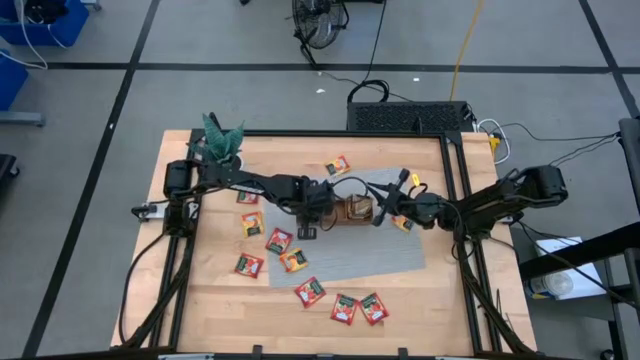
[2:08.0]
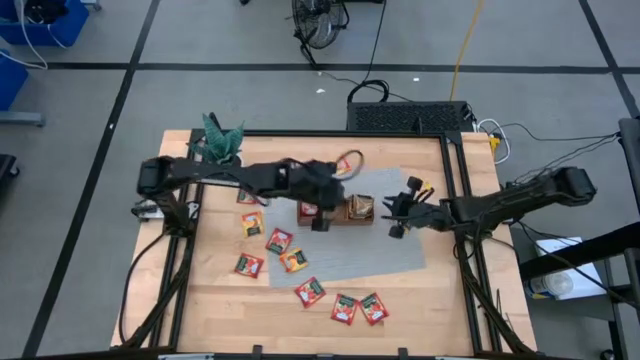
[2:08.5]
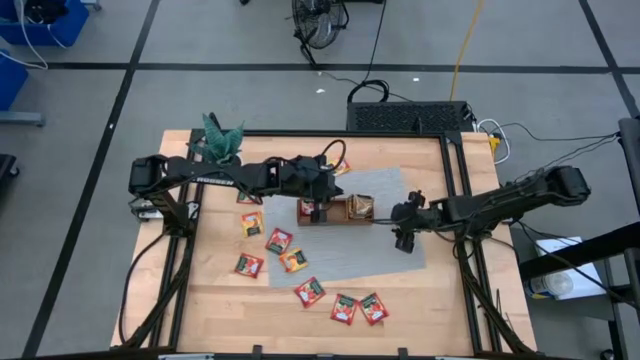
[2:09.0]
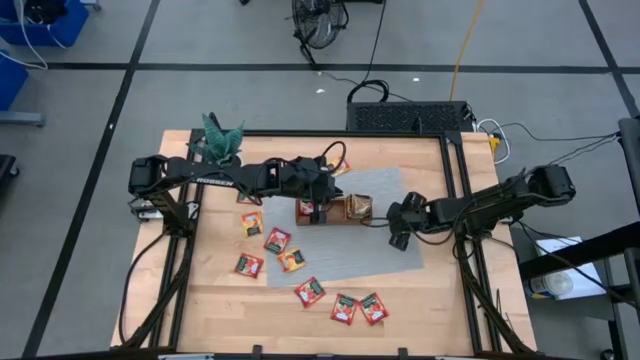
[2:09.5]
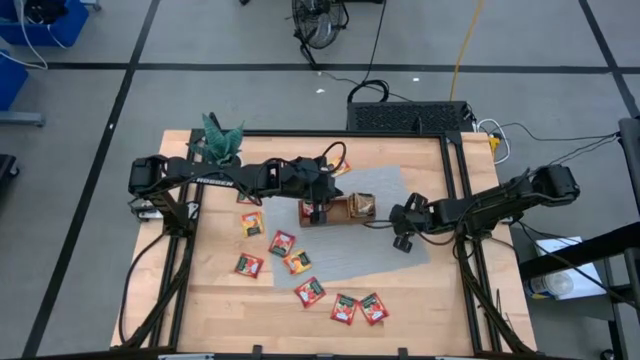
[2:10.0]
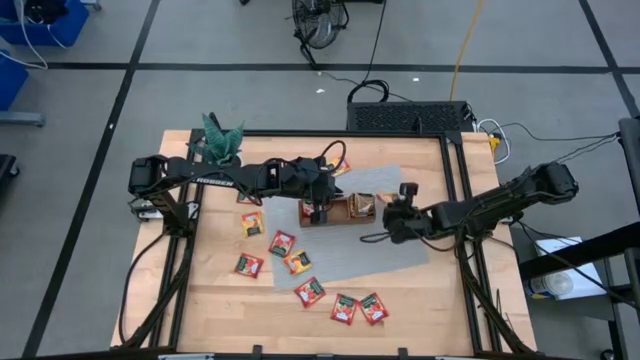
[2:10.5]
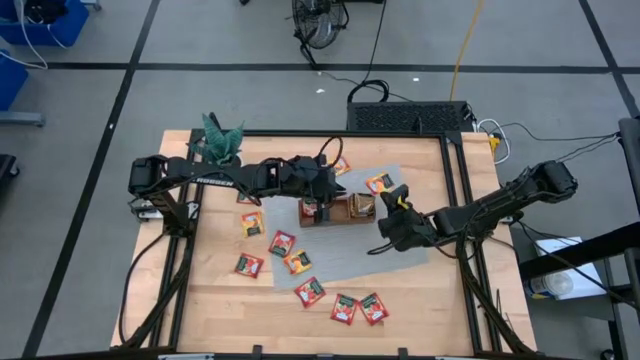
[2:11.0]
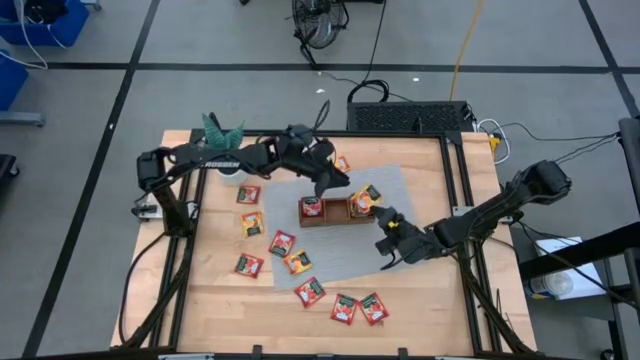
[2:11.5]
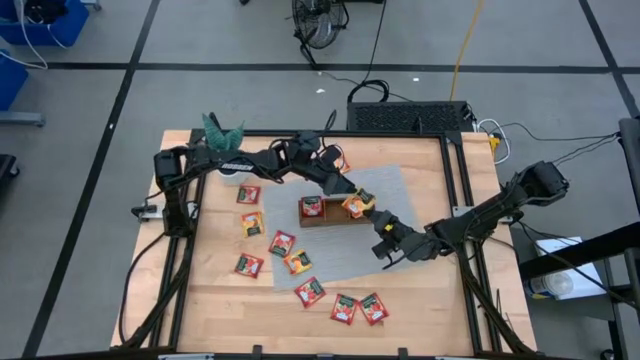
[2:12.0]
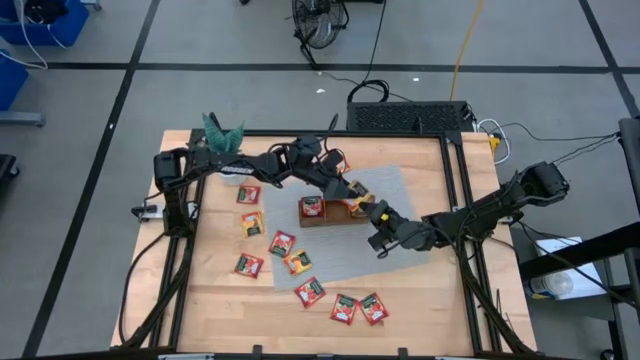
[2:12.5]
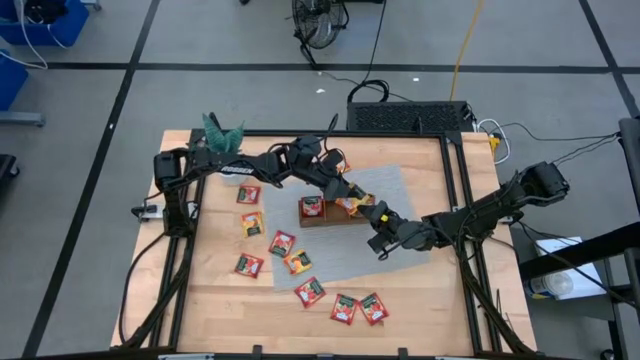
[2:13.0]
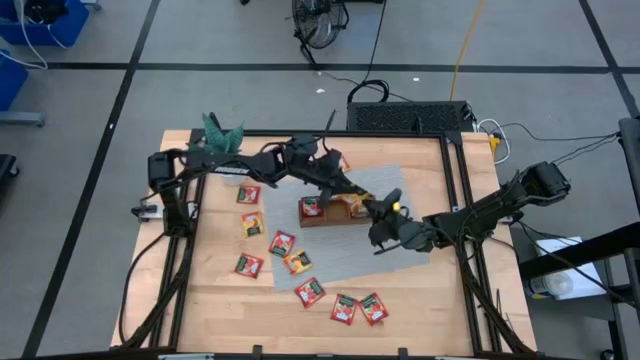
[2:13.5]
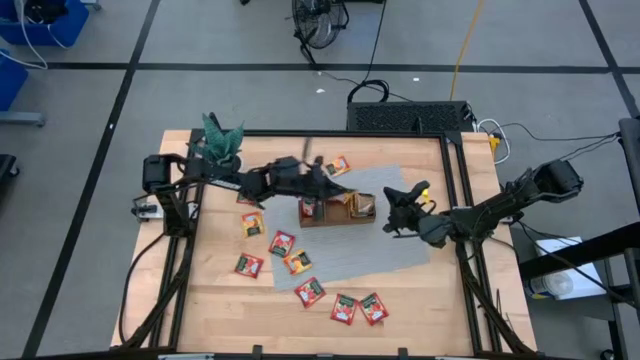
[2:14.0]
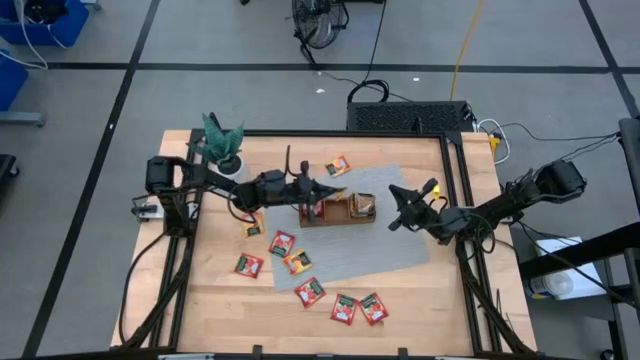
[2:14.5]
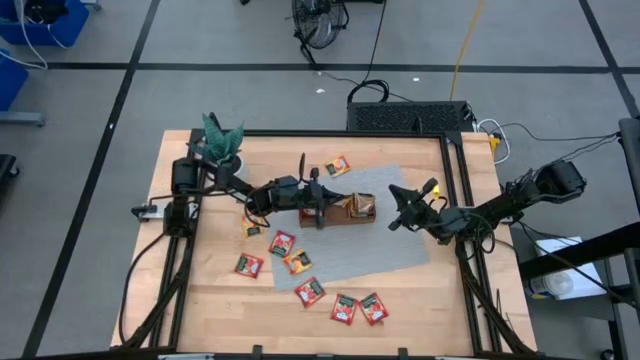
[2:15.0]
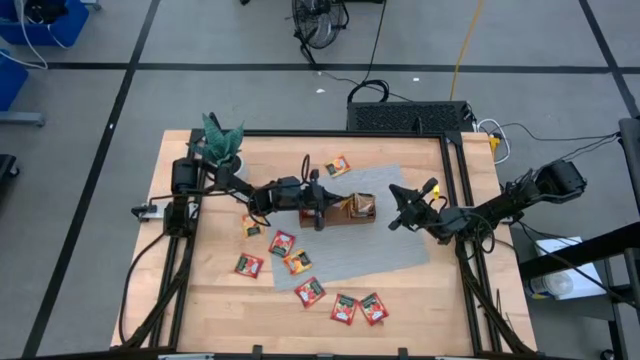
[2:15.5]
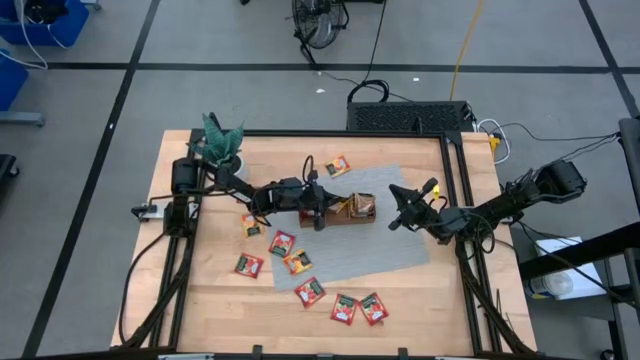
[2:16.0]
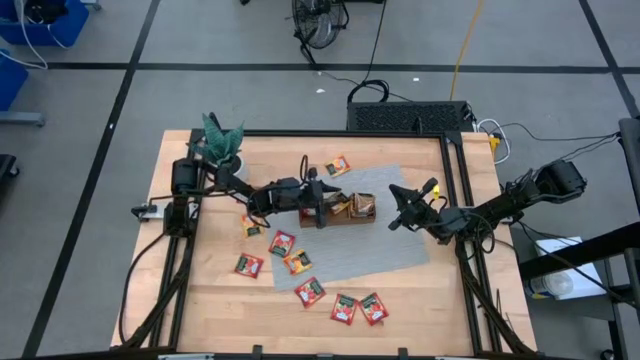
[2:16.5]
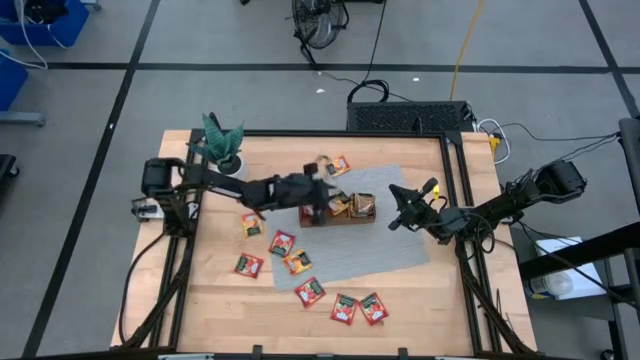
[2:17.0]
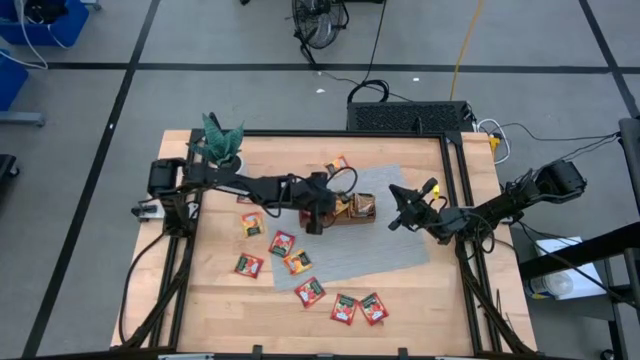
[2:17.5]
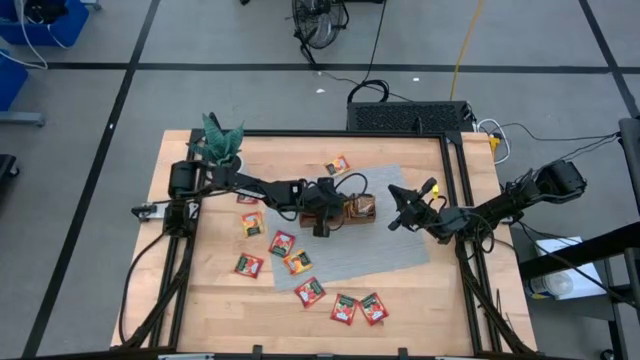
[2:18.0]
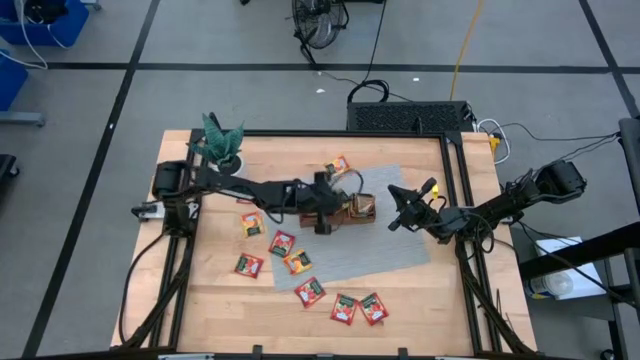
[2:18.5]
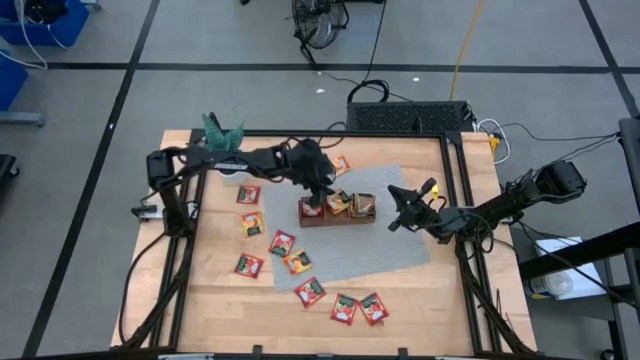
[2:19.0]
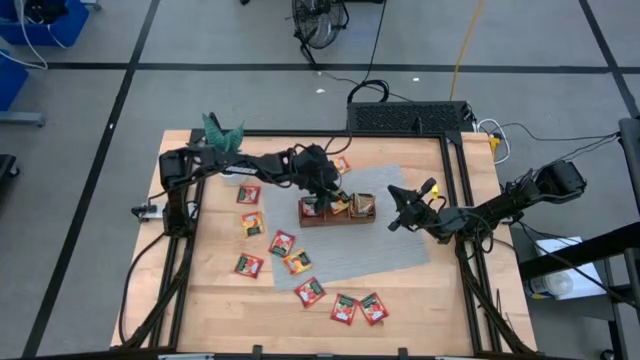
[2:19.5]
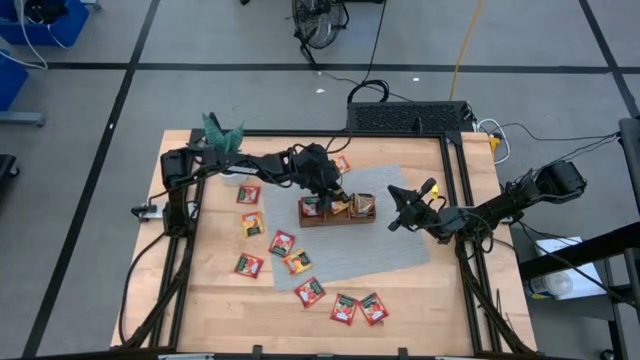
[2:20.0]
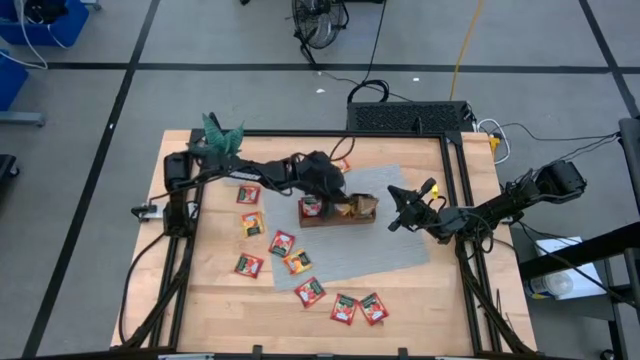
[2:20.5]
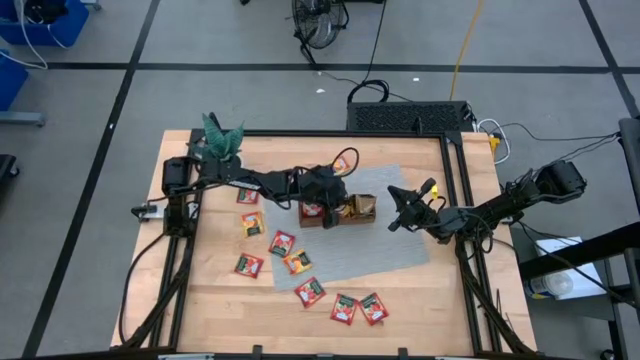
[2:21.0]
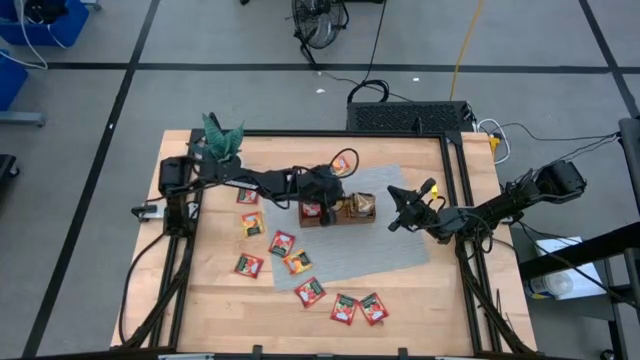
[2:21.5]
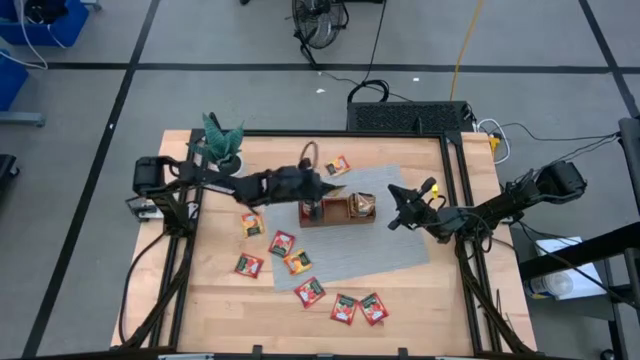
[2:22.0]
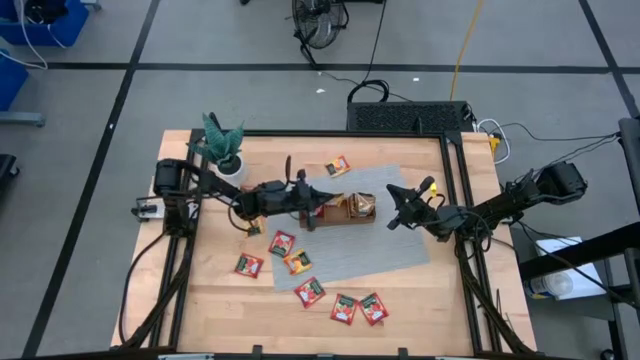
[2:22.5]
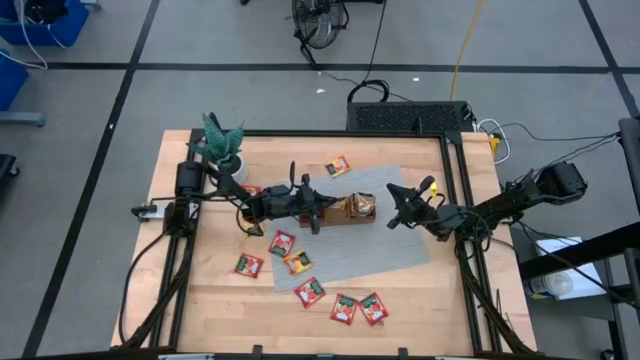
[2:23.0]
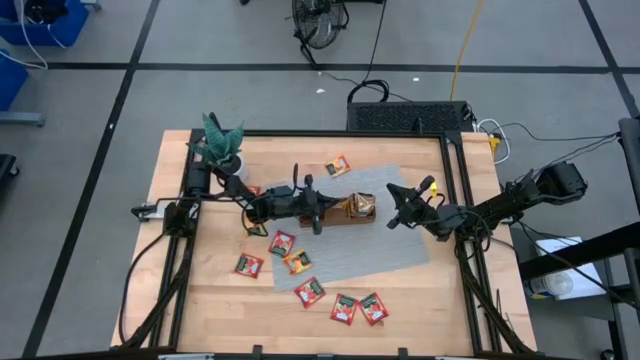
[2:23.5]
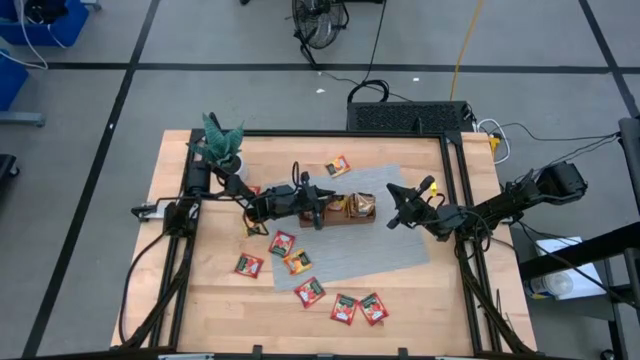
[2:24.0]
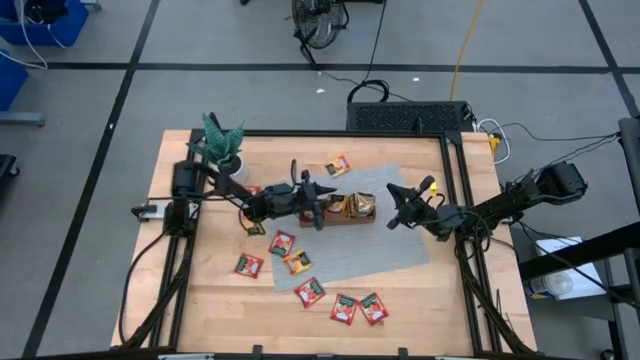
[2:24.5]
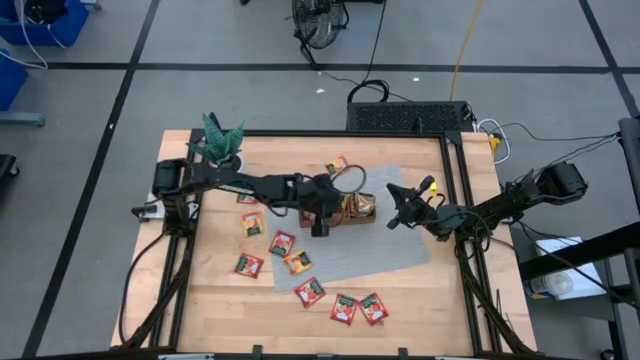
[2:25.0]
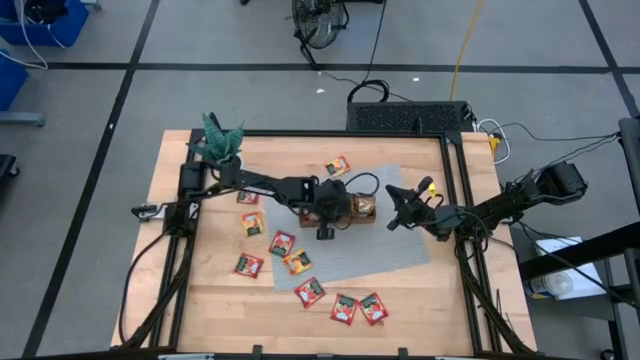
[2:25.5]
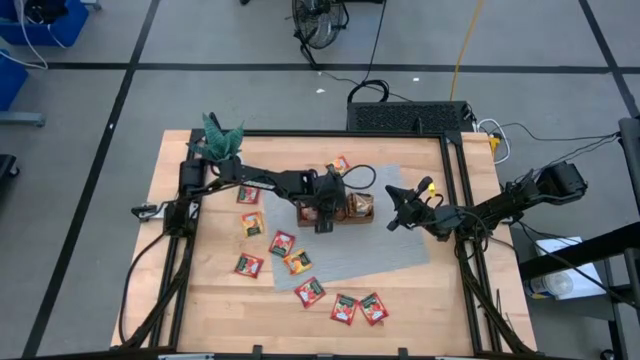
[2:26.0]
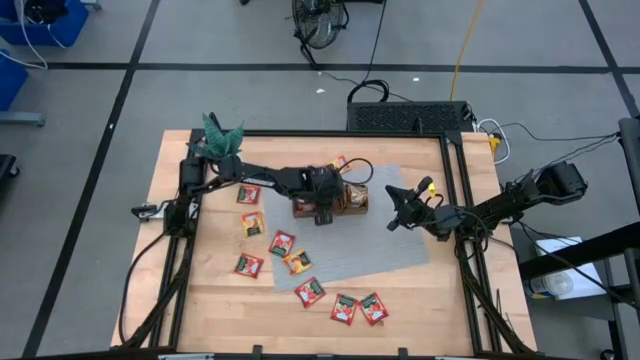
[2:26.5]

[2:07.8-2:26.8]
Task: Pick & Place Tea
Put the yellow tea into the middle part of the wooden organizer

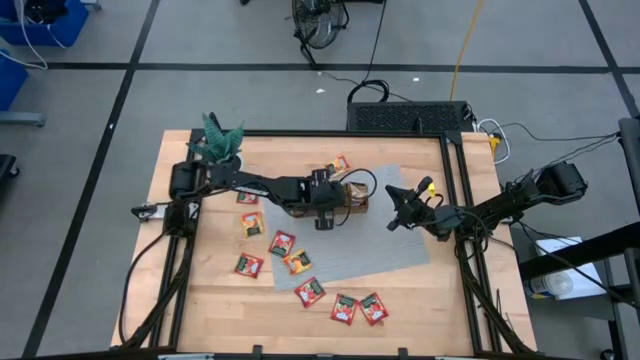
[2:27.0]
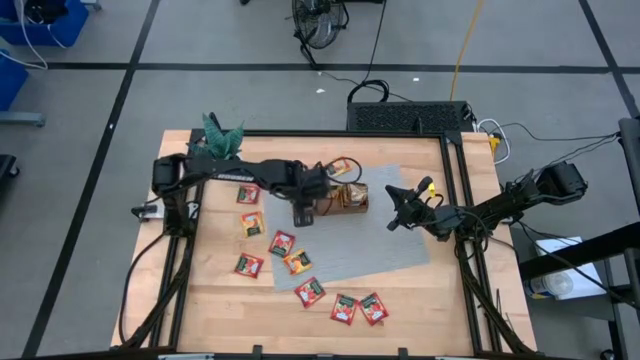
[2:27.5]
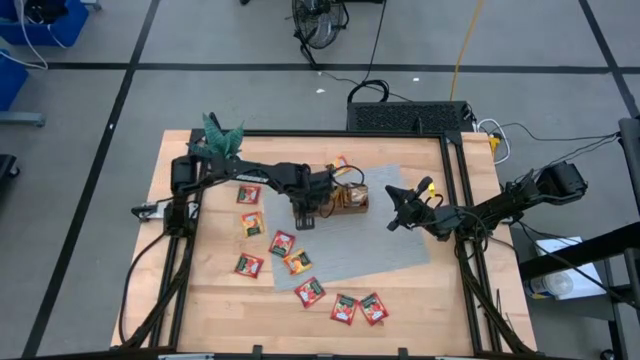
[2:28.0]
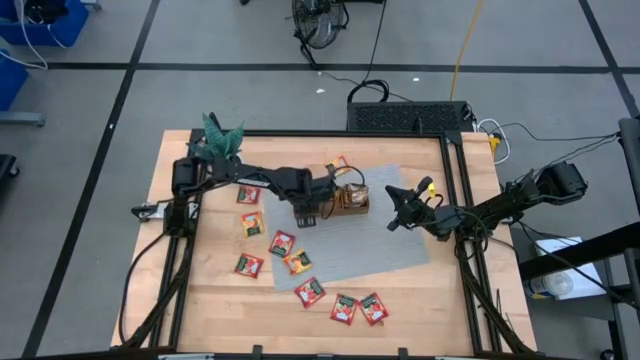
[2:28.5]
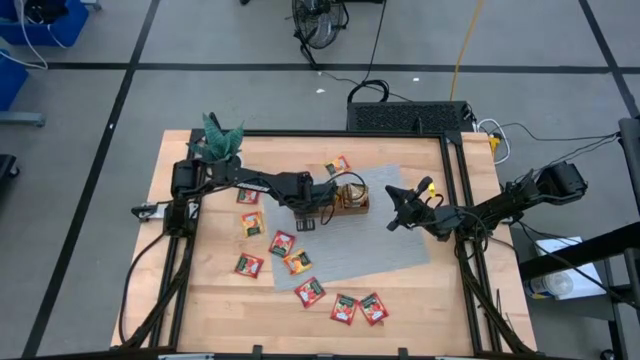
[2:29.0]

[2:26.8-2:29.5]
Adjust the red tea
